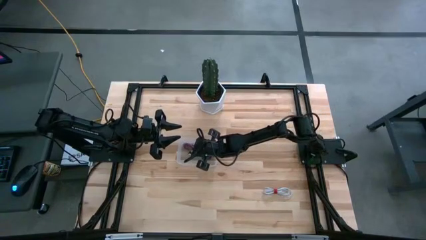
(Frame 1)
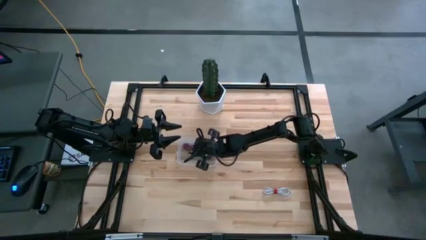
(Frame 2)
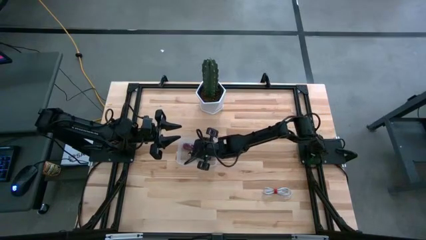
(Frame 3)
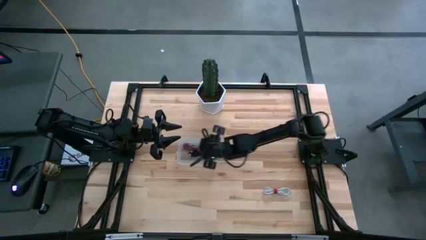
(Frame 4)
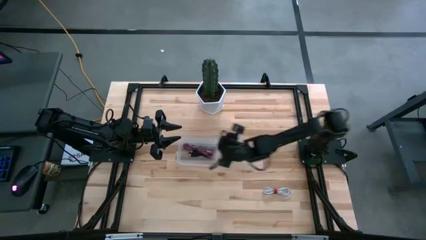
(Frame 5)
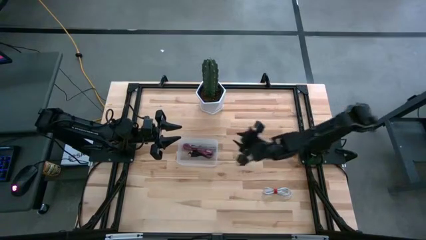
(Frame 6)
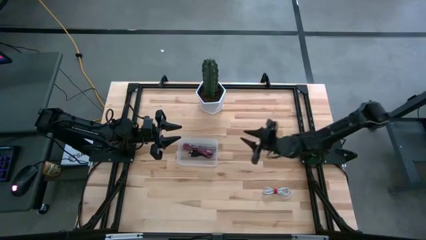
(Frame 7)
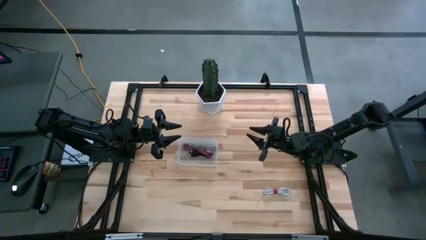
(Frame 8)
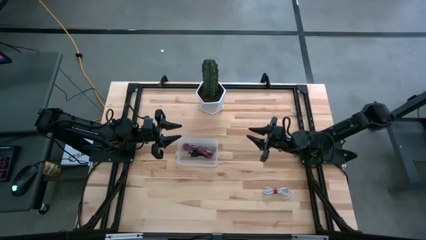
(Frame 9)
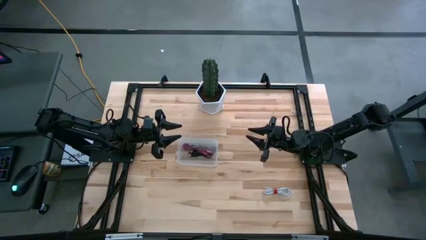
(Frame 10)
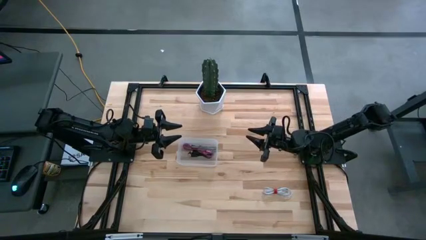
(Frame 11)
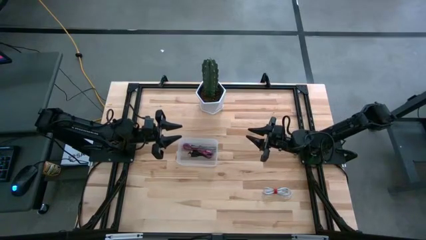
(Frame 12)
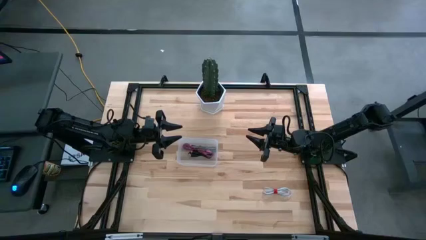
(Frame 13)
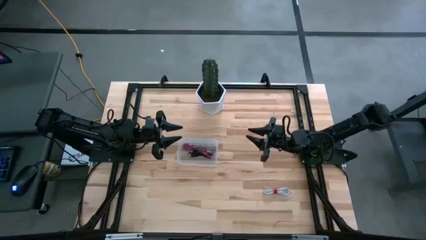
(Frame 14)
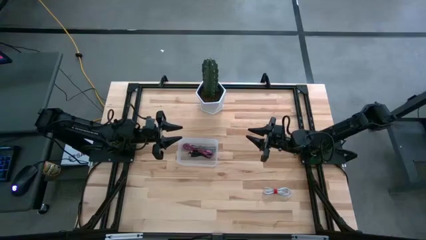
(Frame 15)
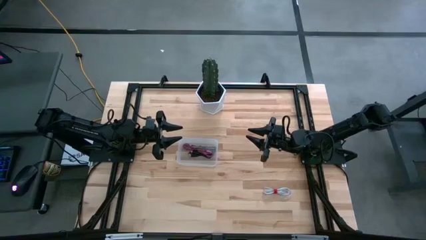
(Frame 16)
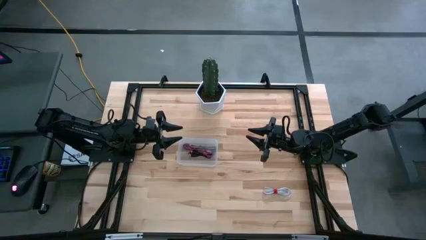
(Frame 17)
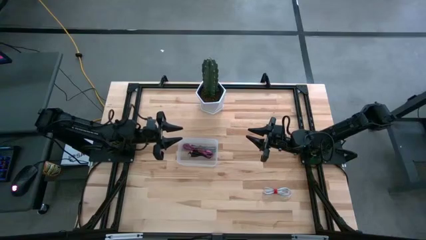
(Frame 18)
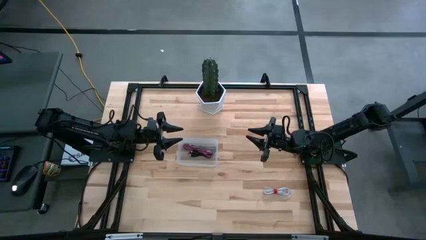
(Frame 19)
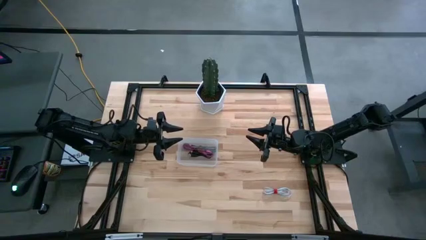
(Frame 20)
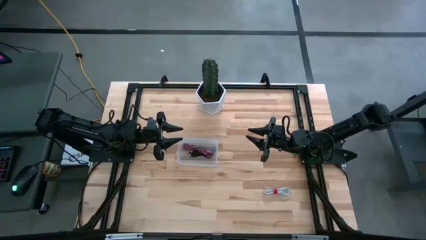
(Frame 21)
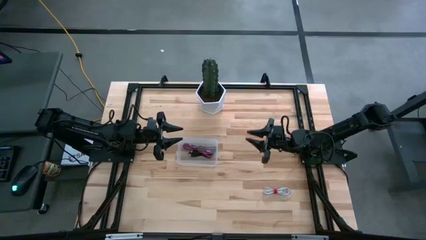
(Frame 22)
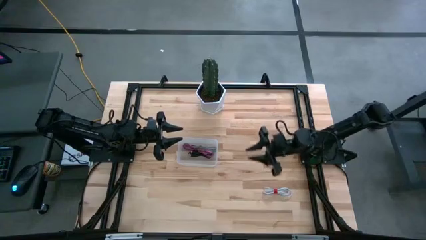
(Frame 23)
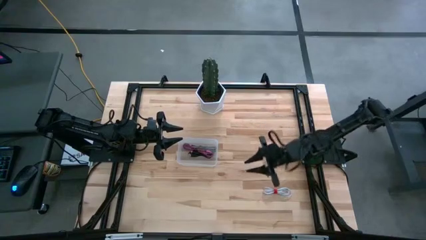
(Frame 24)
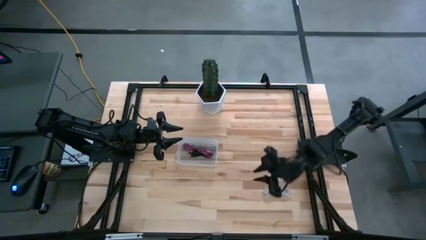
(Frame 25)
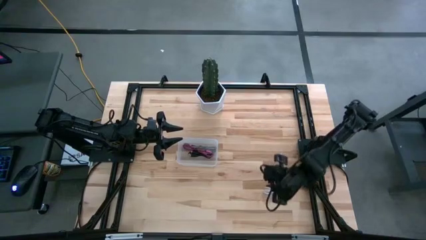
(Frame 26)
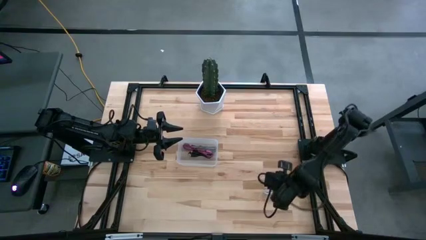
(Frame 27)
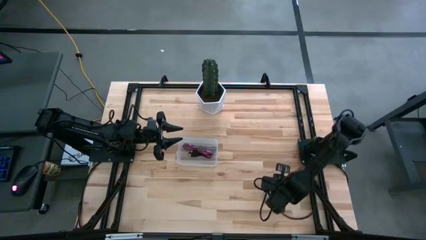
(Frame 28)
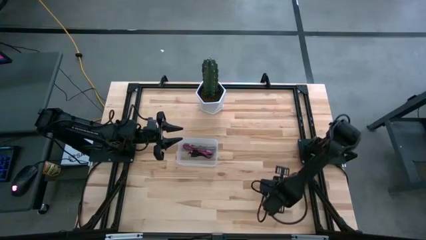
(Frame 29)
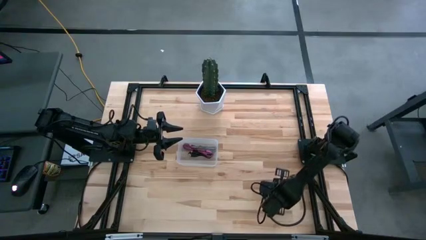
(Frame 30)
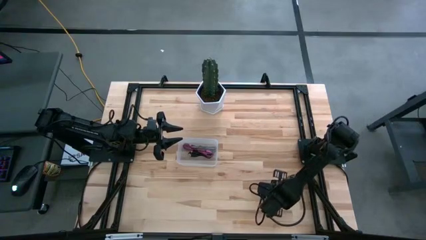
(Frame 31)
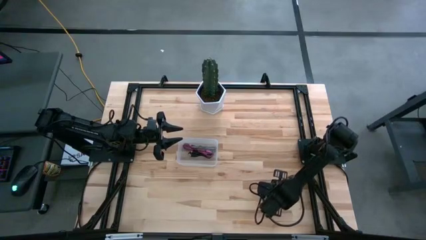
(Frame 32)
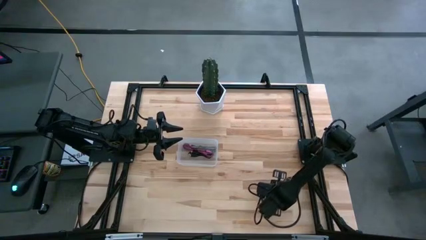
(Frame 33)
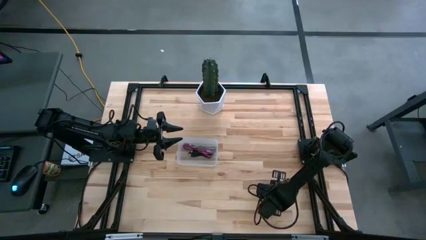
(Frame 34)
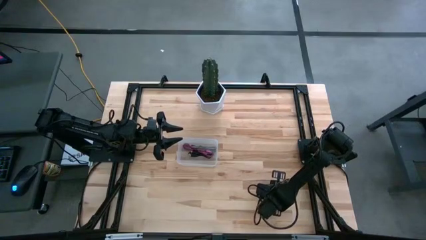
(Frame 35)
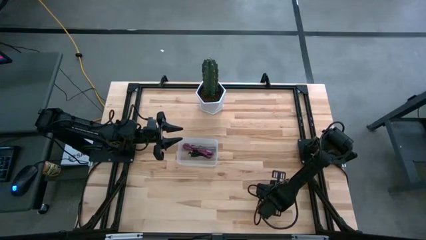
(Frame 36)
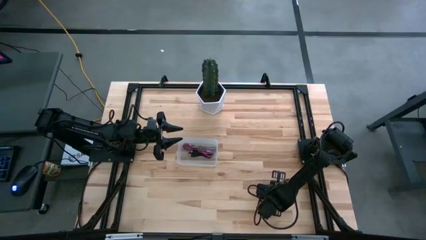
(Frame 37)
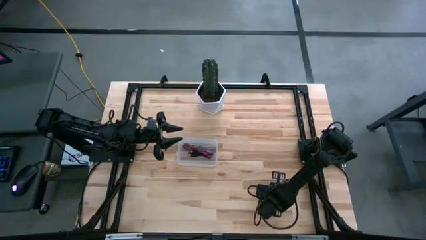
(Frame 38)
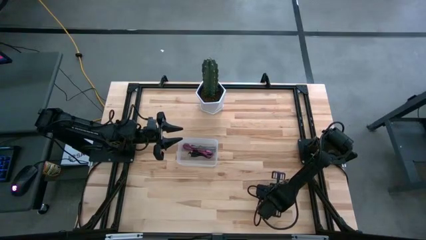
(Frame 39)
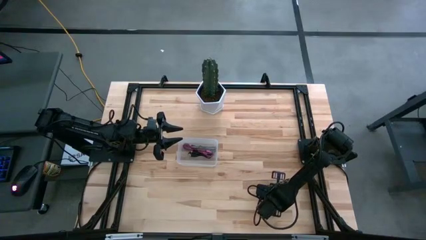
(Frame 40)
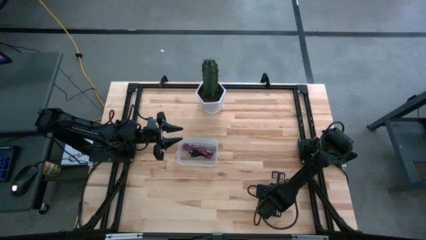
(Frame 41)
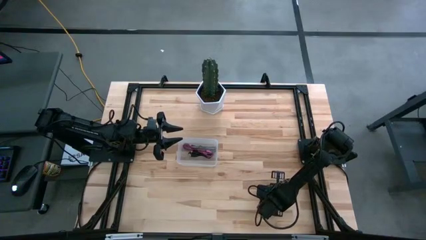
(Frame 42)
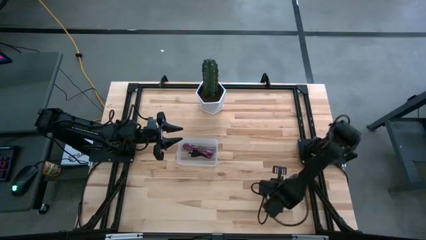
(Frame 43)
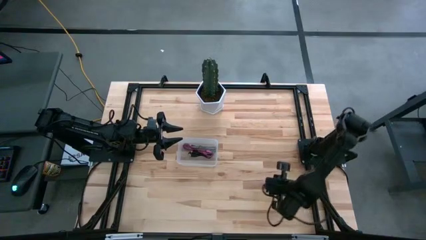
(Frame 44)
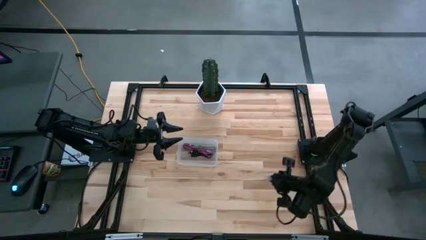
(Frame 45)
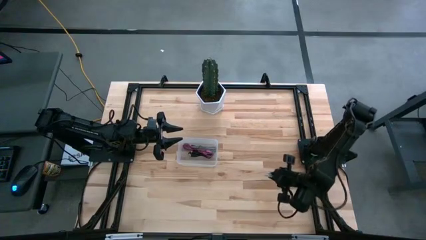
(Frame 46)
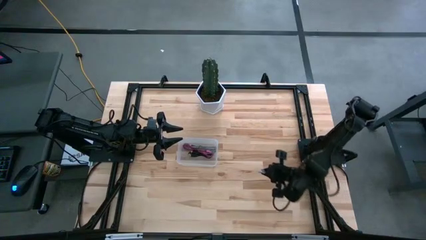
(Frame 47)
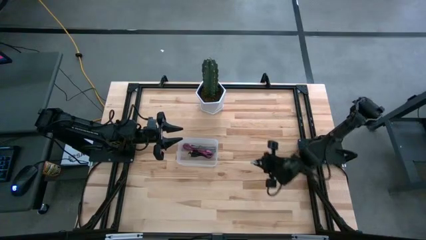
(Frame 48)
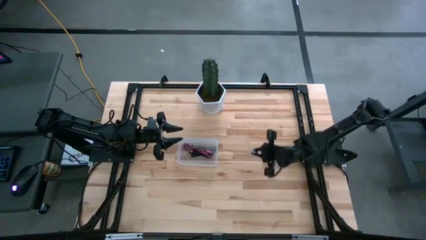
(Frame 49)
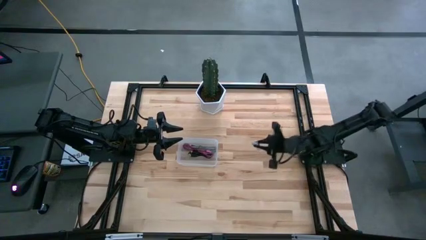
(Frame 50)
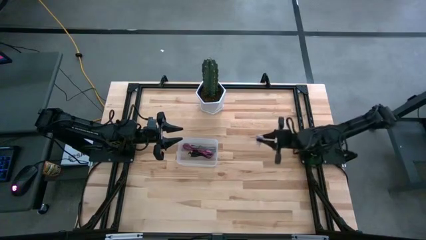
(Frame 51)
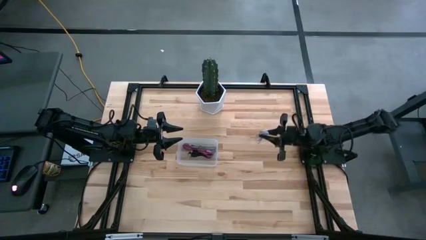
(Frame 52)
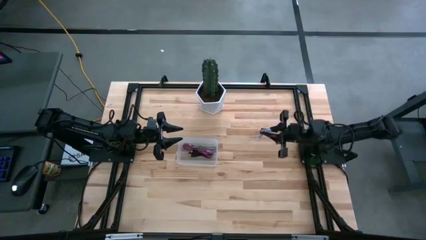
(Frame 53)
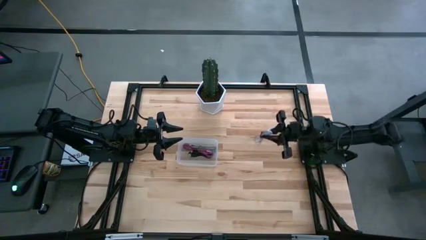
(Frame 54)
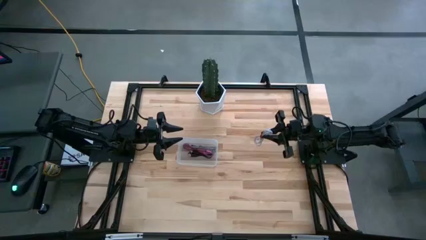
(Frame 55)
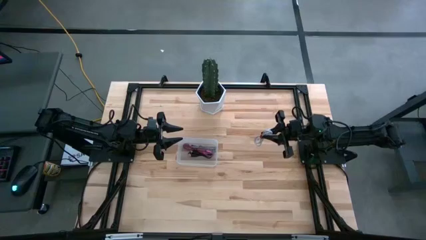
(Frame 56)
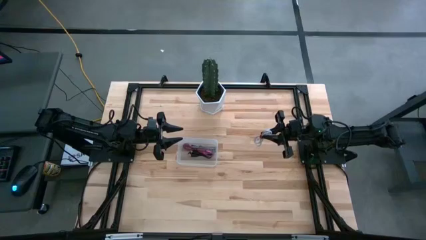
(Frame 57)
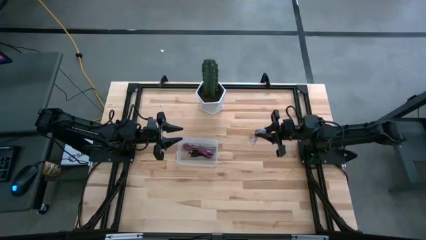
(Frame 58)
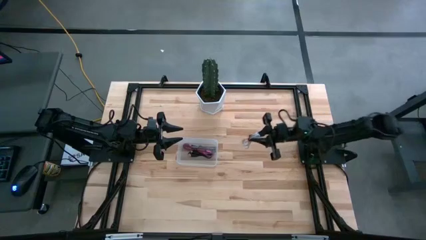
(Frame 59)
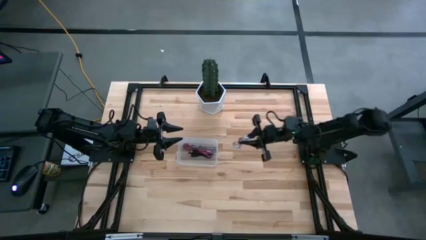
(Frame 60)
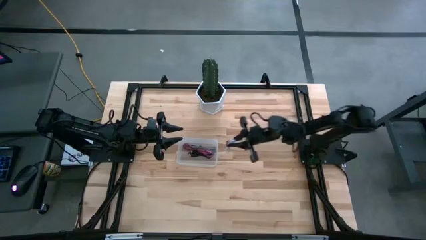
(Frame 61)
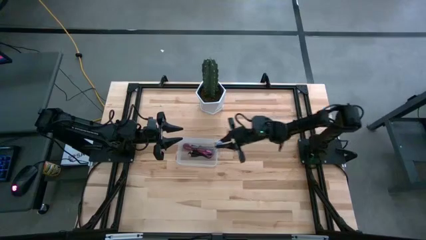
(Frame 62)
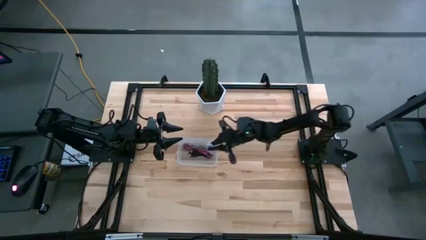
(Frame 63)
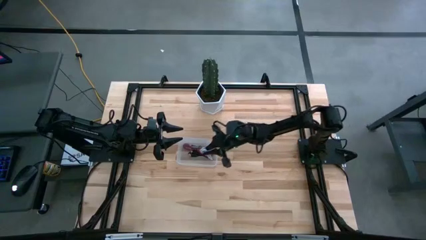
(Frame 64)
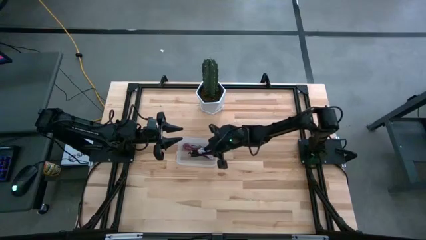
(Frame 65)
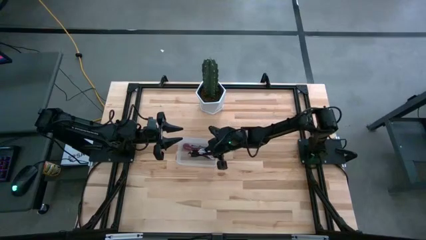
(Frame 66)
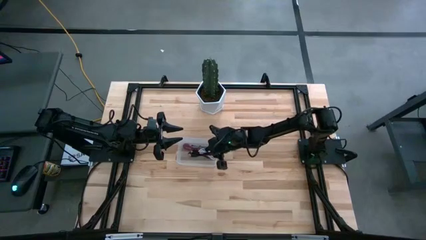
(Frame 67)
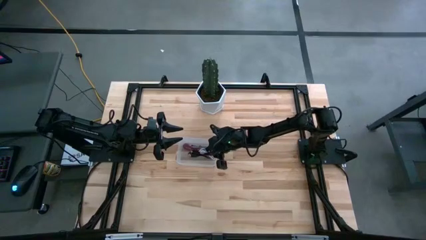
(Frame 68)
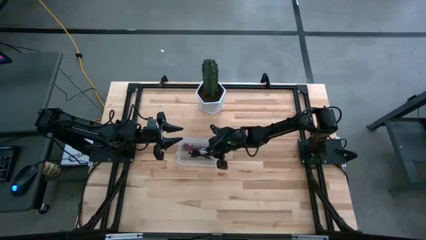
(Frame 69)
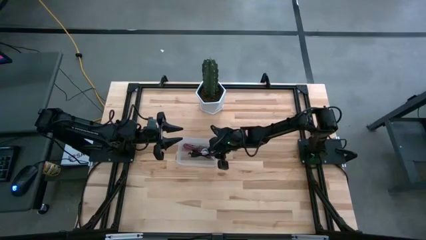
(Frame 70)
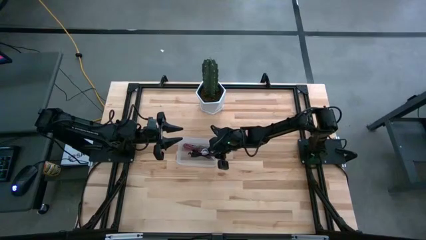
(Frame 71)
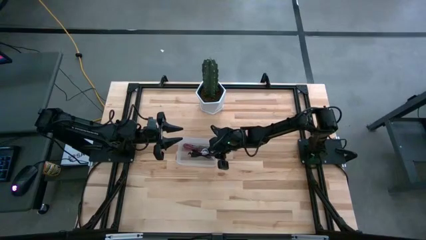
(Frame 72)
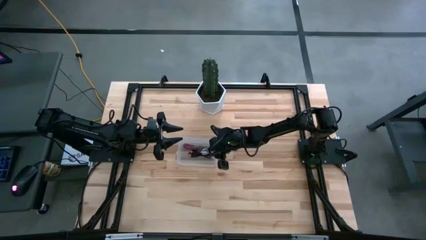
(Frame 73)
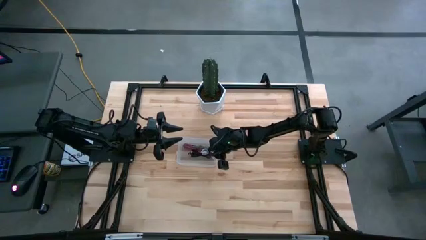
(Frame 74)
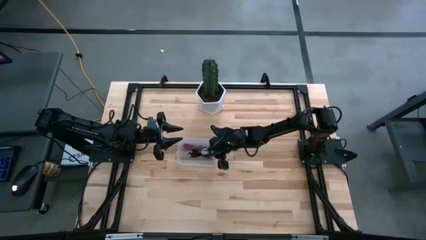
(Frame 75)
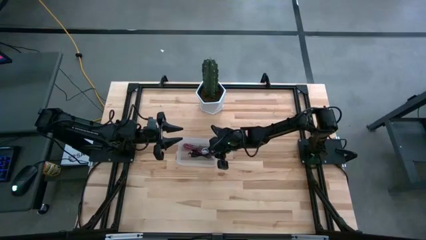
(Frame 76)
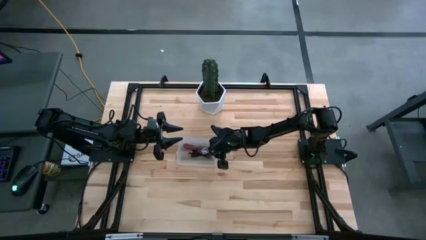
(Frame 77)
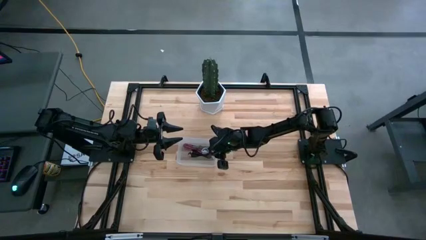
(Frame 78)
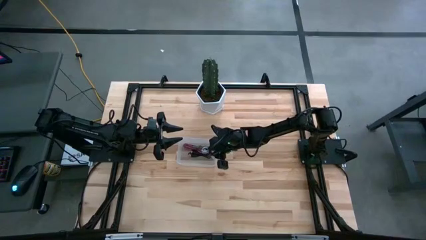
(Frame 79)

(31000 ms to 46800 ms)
Task: Pick and place USB-C Cables
Put the white charger cable into the transparent bin
